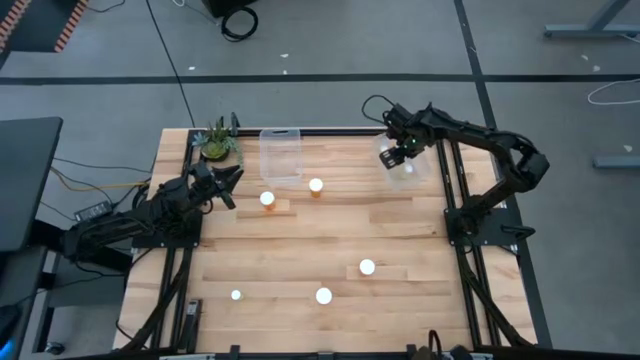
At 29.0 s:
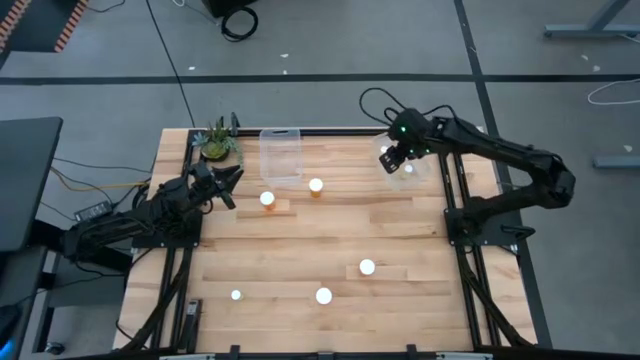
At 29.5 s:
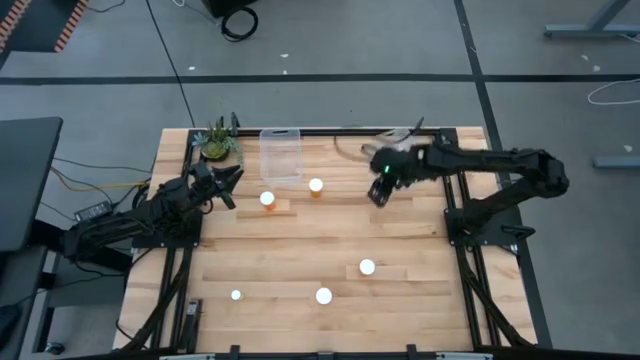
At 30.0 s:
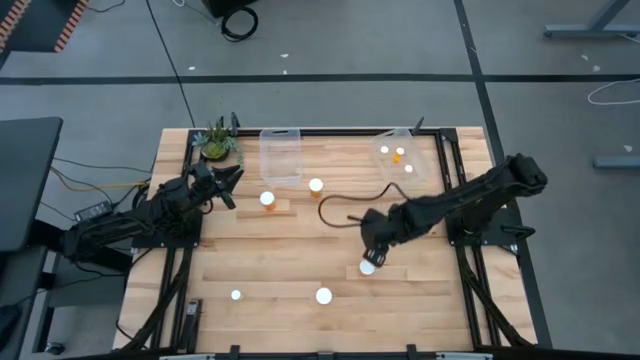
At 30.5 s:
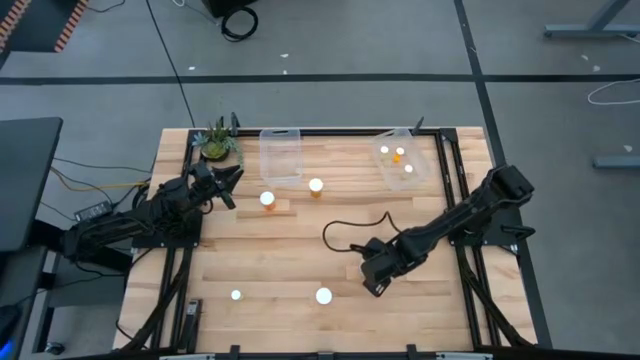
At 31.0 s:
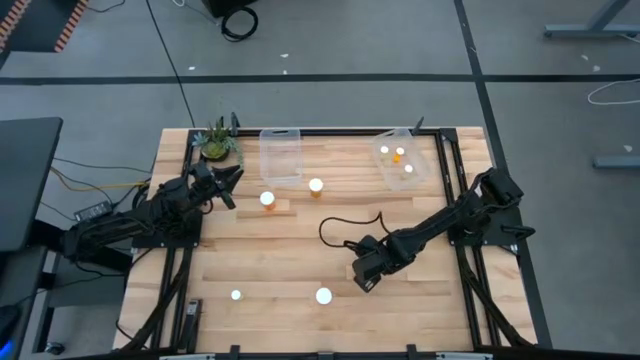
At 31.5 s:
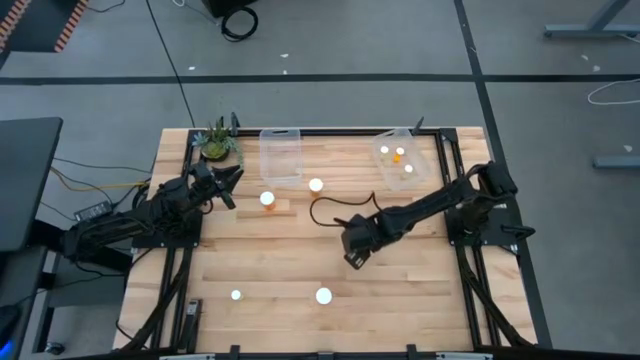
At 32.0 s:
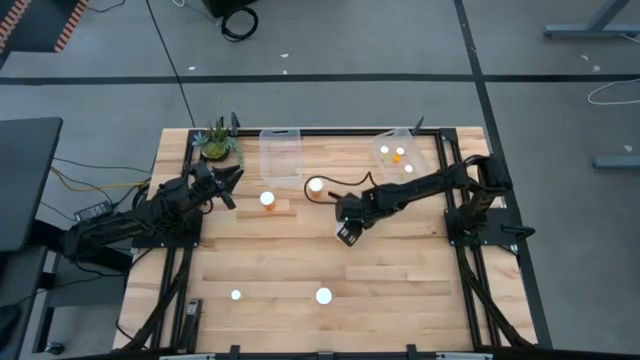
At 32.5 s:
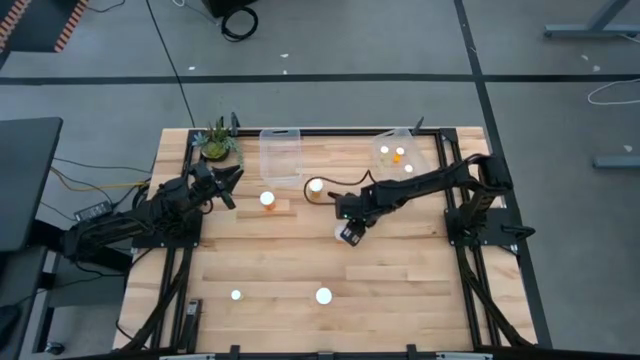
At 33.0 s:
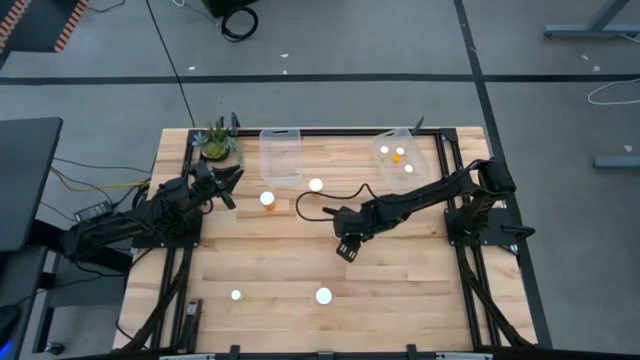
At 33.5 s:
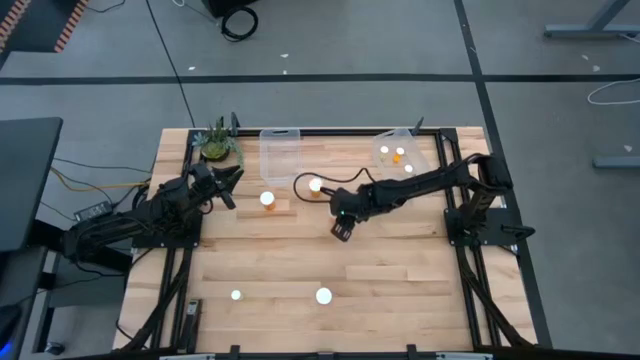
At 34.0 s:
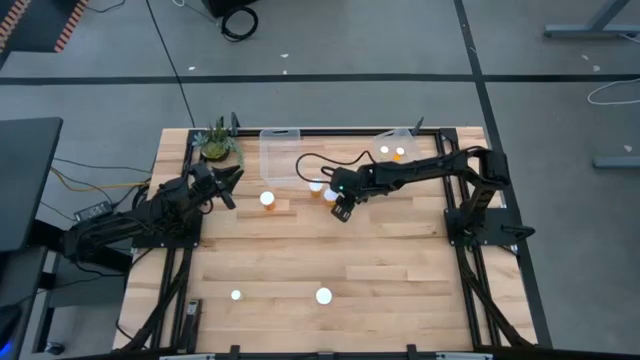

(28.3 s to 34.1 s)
Task: Pick and place medicine bottles into bin by pill shape (circle, oval)
Move the big orange pill bottle to the top of the table

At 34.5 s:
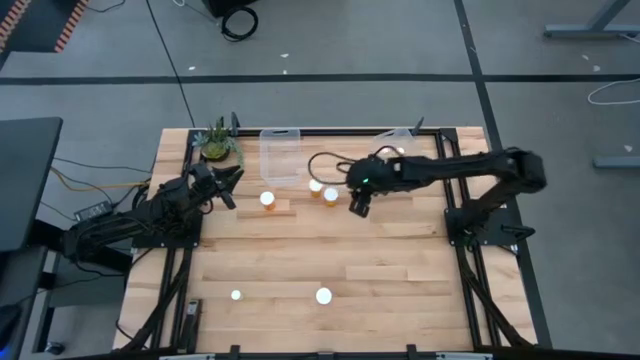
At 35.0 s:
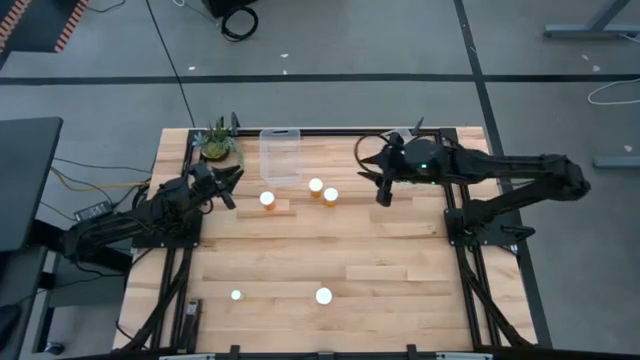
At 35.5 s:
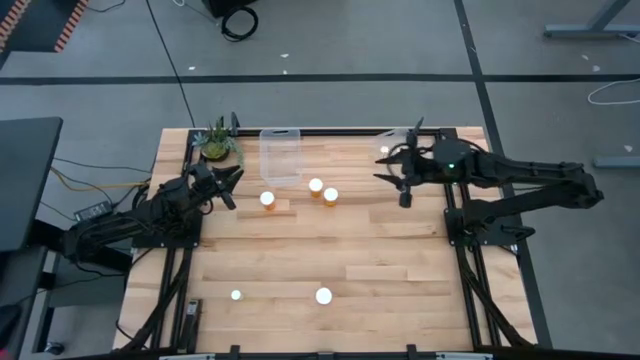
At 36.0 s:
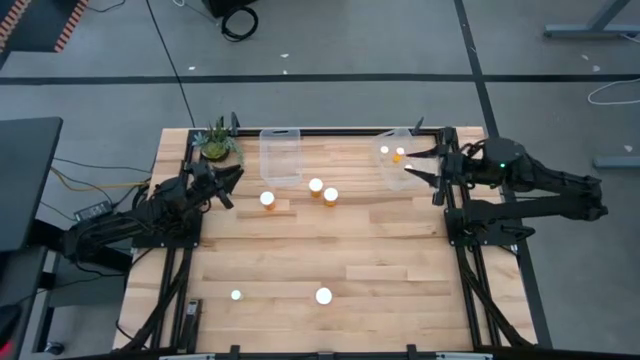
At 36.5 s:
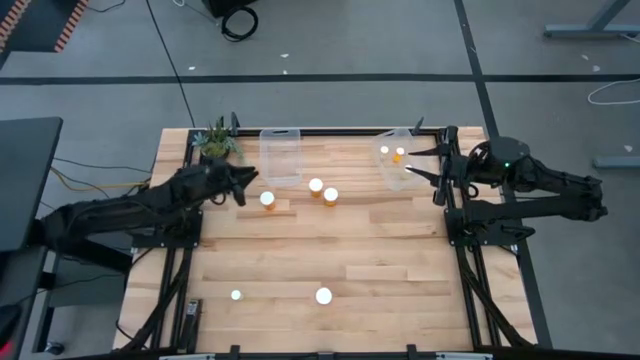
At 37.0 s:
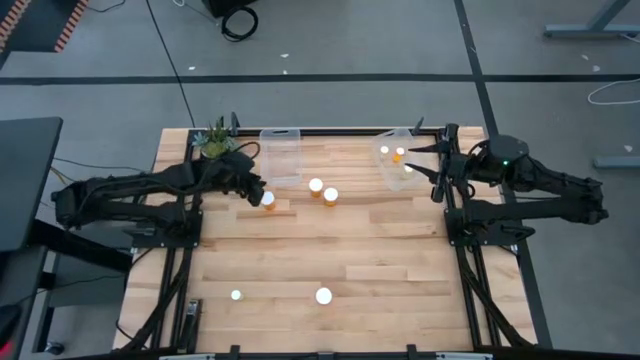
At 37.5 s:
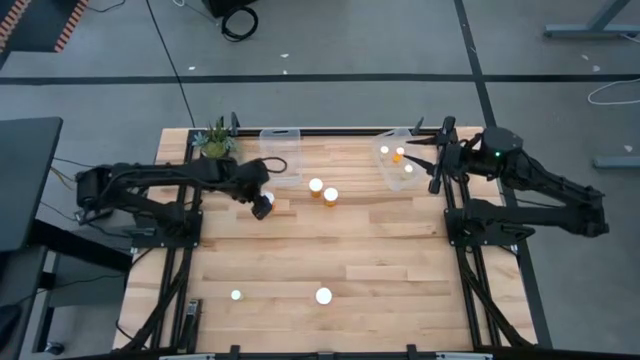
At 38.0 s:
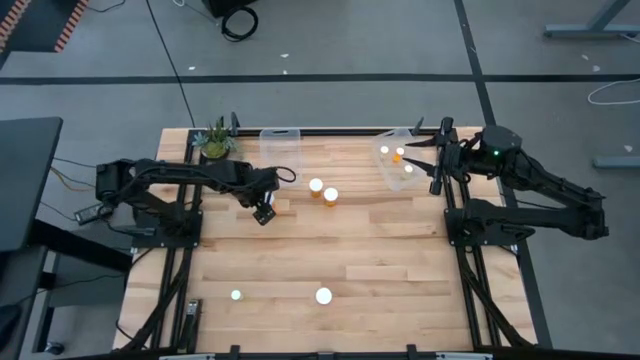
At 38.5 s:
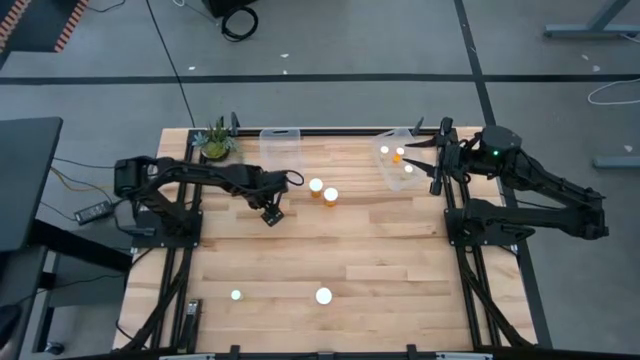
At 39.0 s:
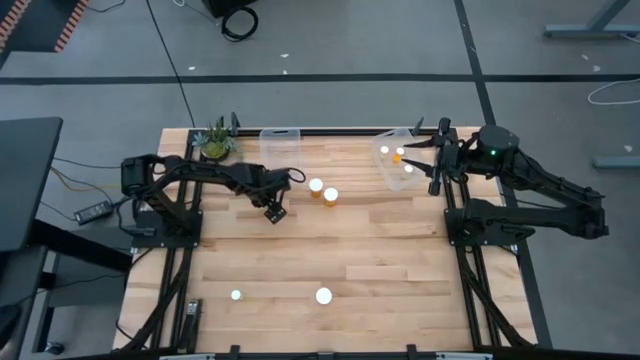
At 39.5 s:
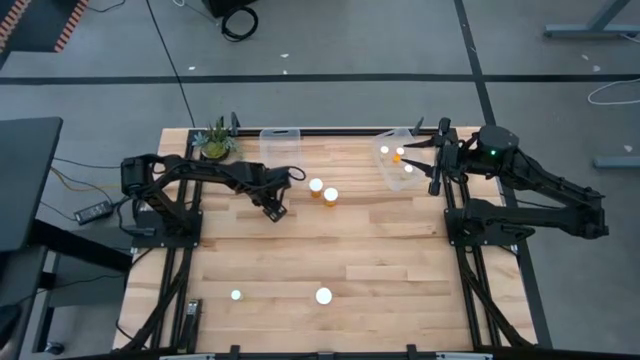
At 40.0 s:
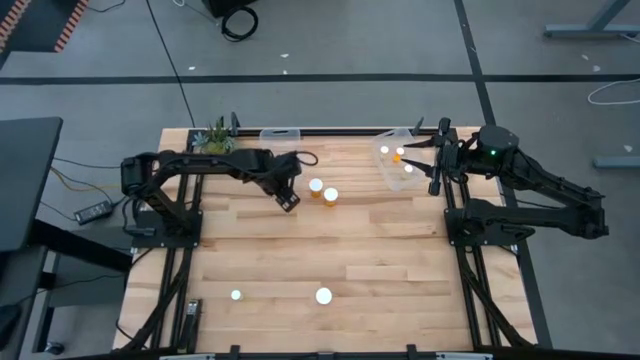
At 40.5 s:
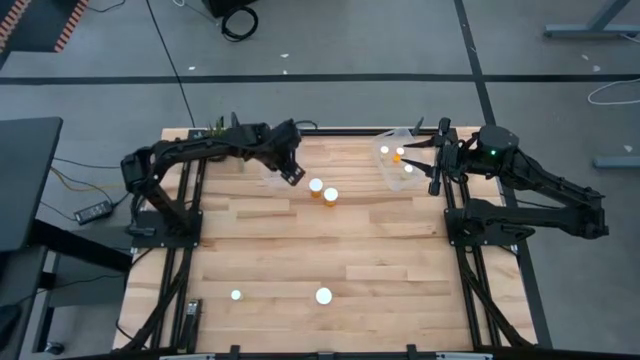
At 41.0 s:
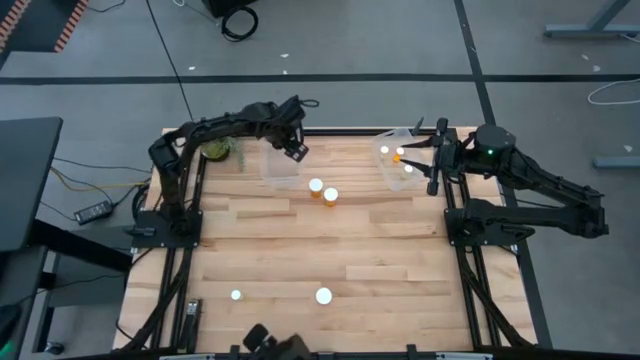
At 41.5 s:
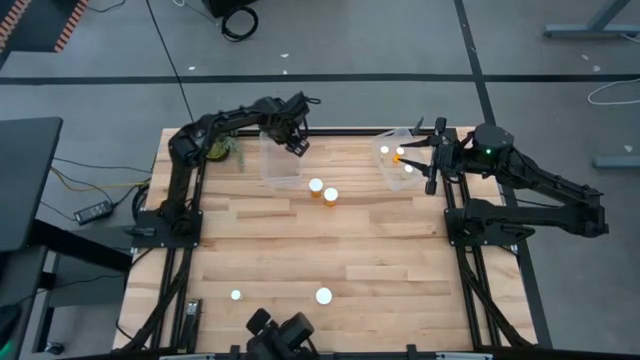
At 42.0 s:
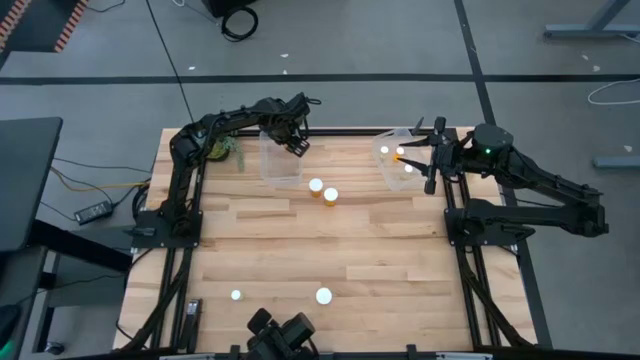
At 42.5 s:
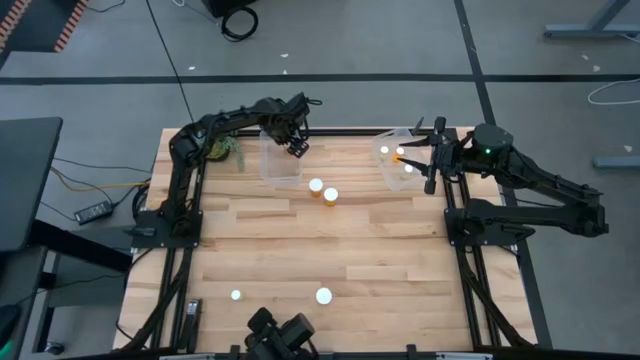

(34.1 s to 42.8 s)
Put the big pill bottle into the left transparent bin

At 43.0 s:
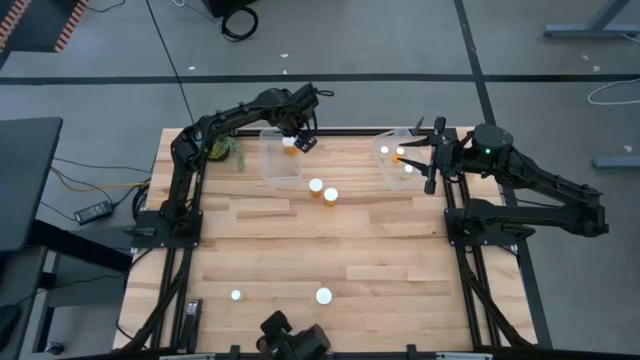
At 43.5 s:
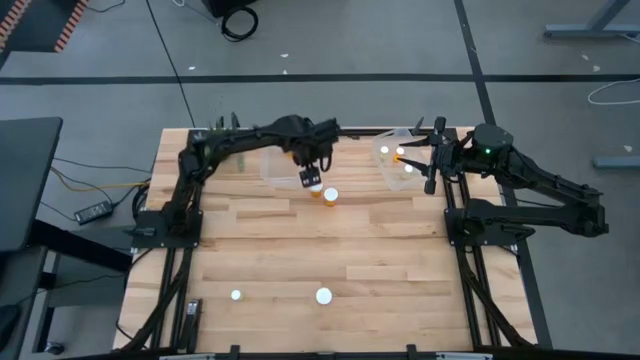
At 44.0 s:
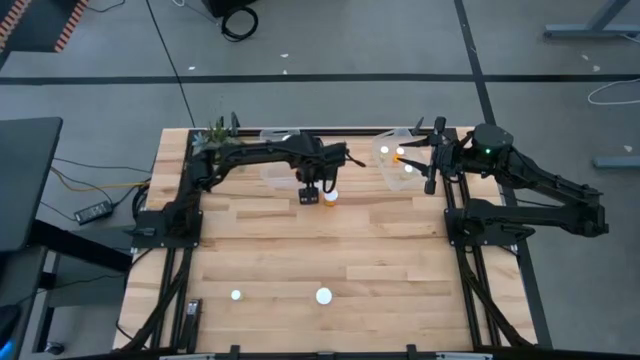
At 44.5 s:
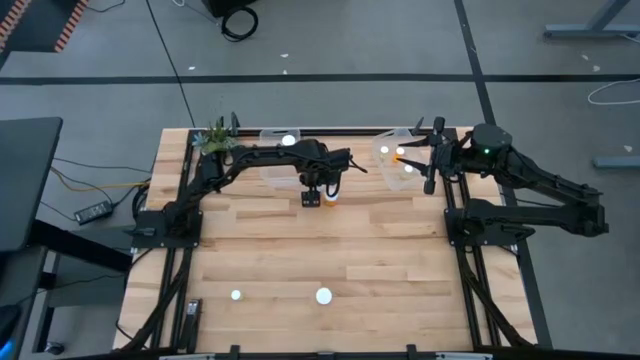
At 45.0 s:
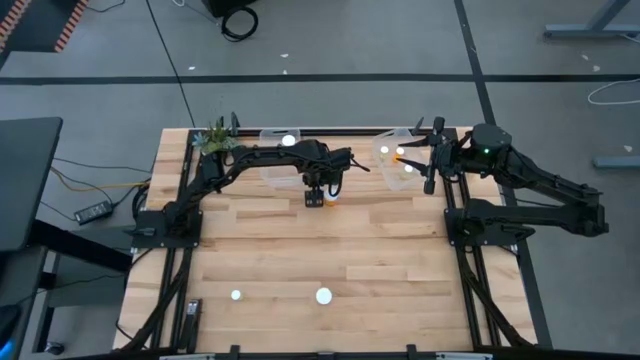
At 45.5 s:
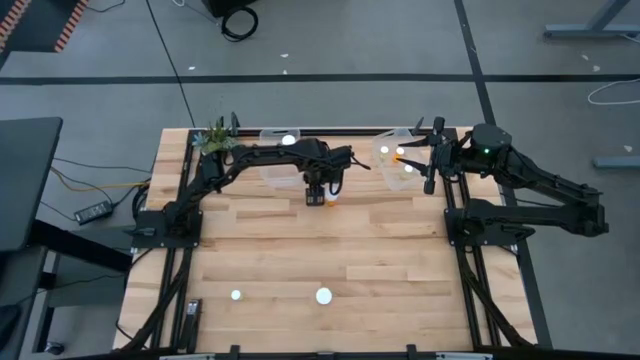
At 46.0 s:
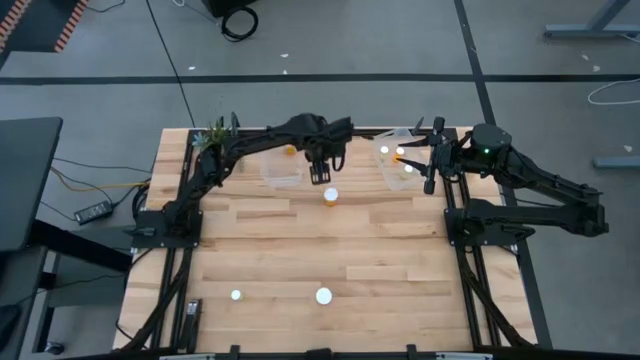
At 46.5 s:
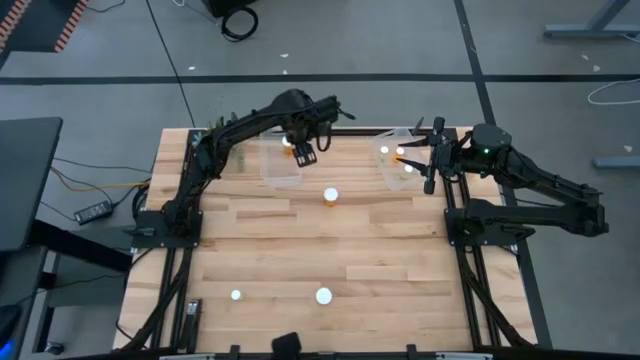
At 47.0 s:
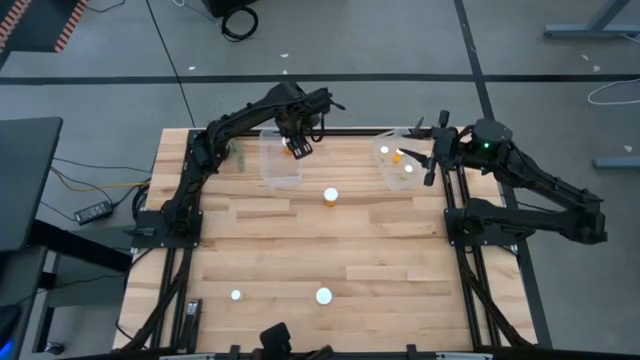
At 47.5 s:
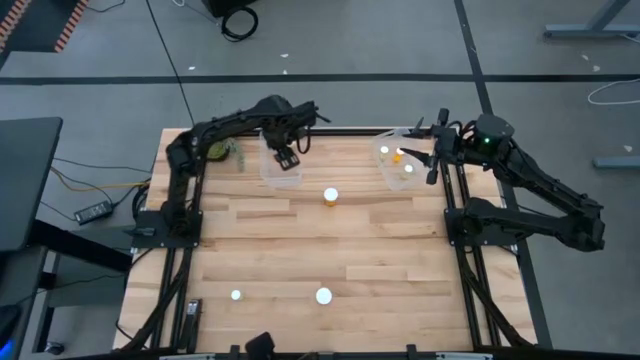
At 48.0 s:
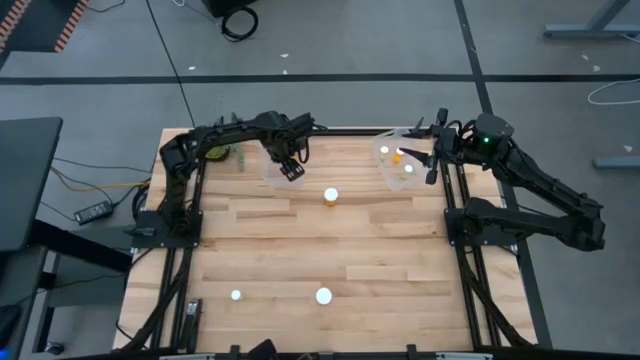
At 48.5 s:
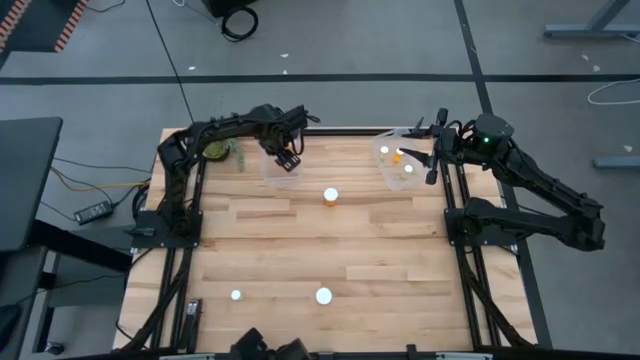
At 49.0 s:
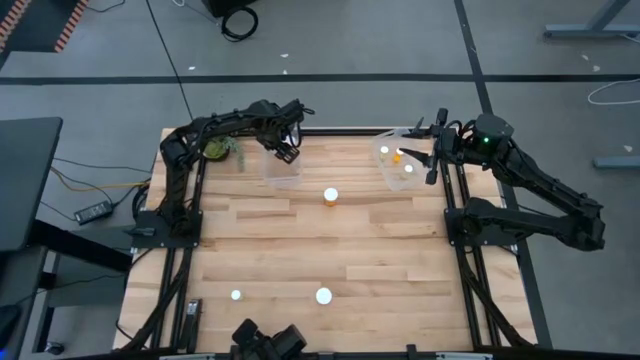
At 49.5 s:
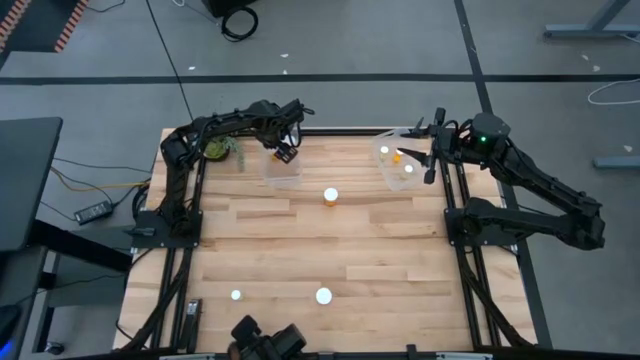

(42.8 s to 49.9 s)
Put the big pill bottle into the left transparent bin
